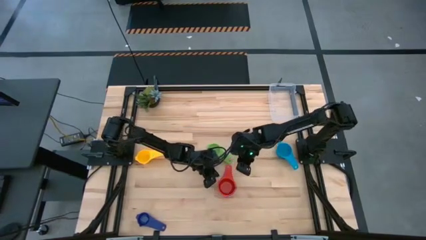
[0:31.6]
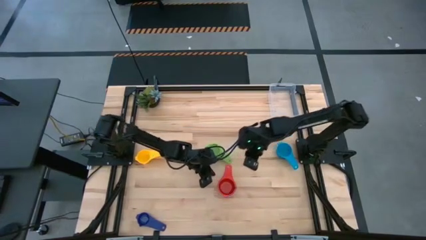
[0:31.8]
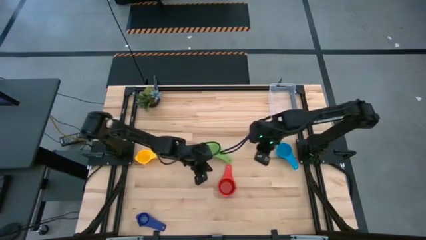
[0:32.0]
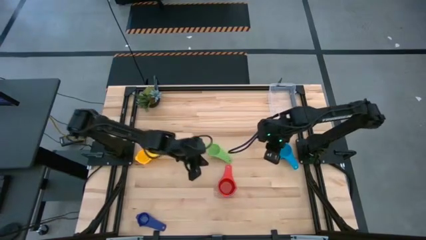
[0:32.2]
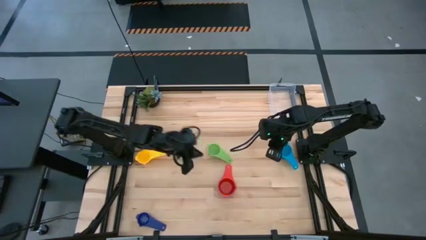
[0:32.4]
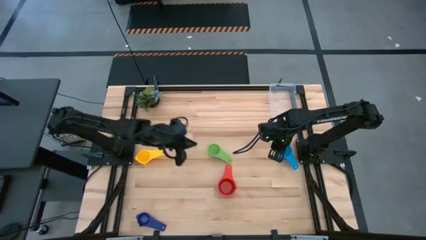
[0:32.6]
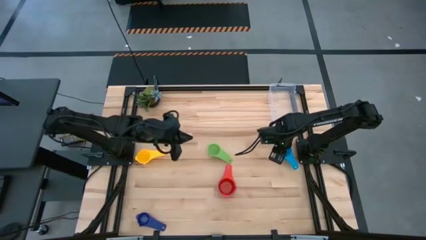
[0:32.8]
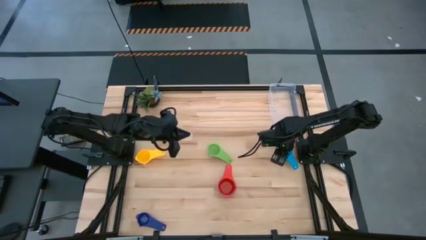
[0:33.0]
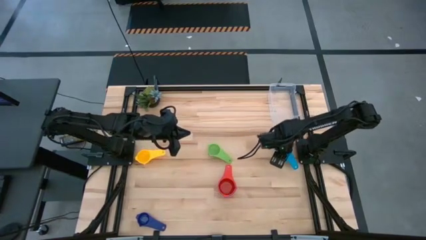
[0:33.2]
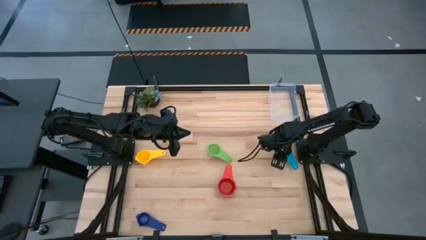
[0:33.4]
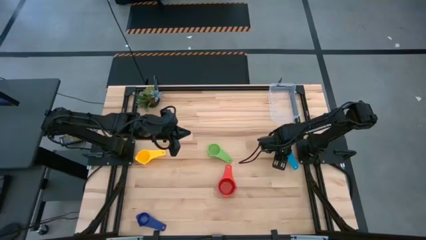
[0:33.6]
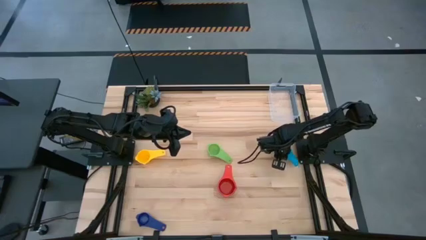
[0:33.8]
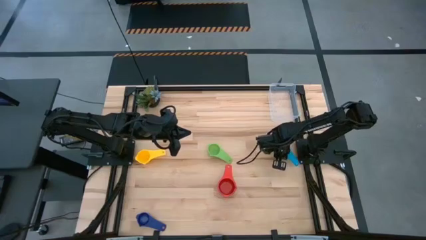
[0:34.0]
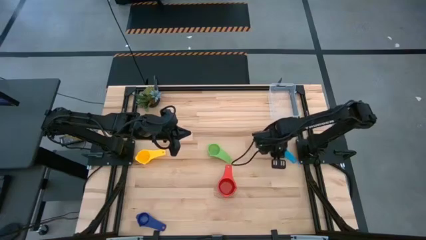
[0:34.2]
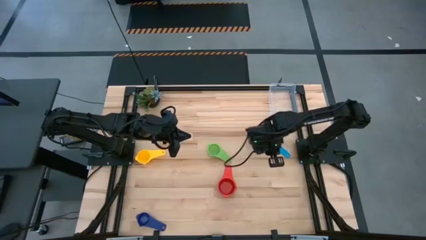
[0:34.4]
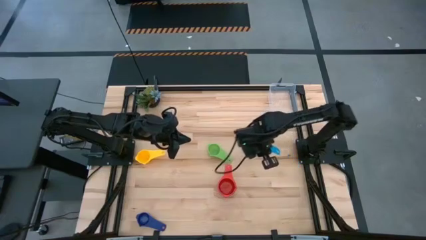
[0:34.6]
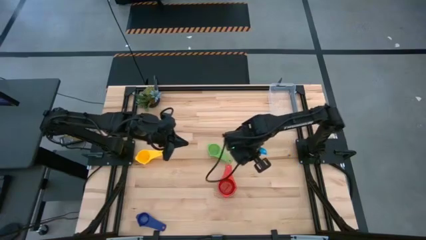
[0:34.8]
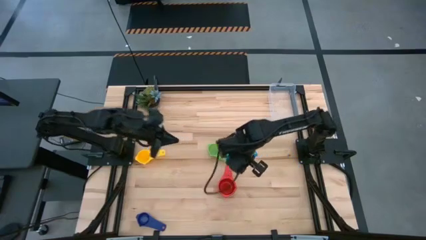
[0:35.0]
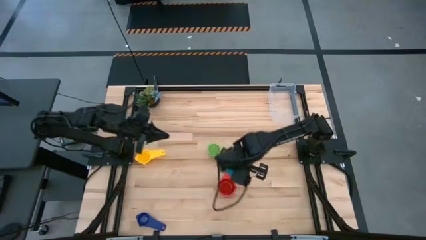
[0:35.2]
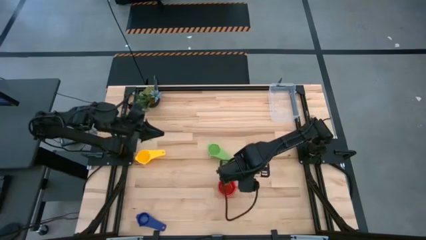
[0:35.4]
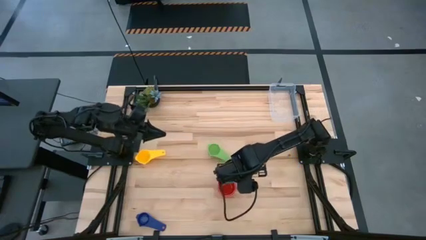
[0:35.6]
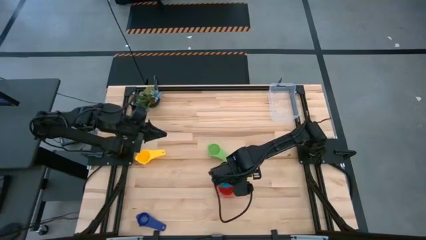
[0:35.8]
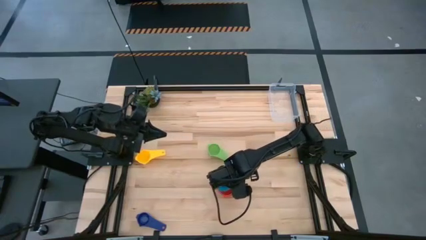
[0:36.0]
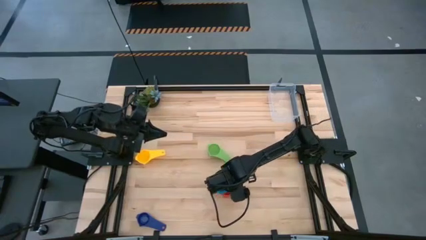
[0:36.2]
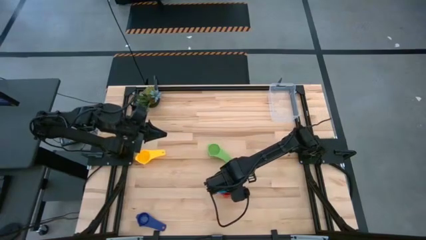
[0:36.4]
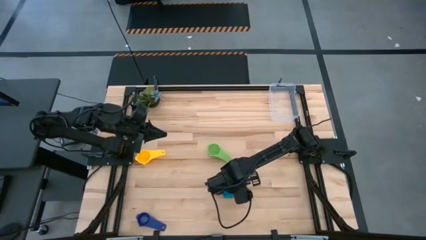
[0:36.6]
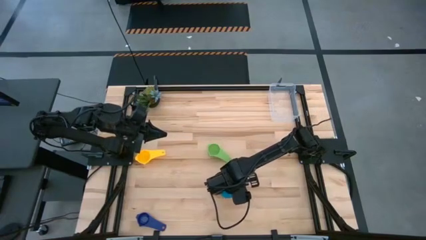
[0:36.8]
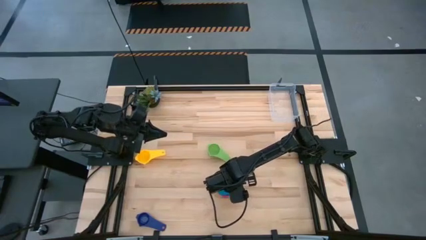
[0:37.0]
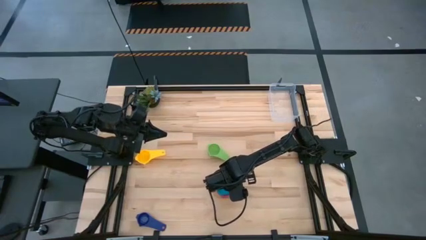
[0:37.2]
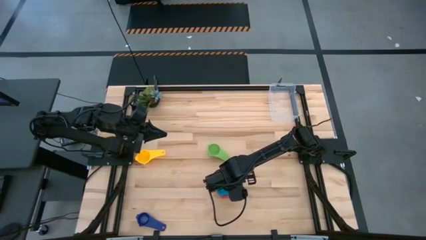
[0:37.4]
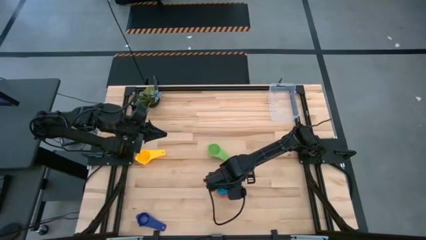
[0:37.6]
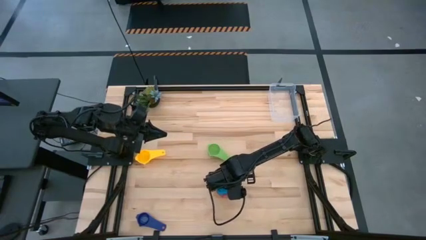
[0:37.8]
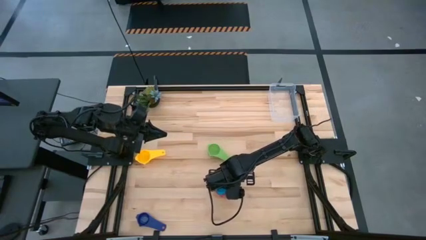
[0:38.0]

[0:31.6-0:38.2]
Task: Nest measuring cups in basket
Stack the light blue measuring cup on top of the red measuring cup

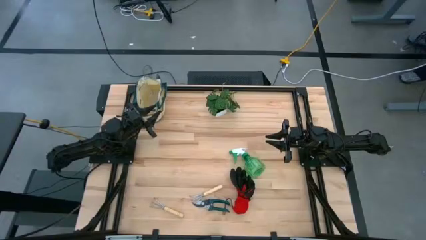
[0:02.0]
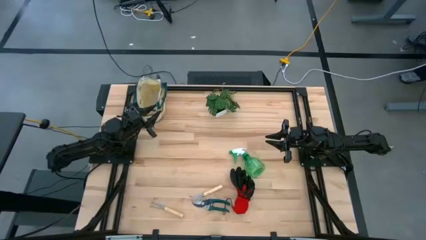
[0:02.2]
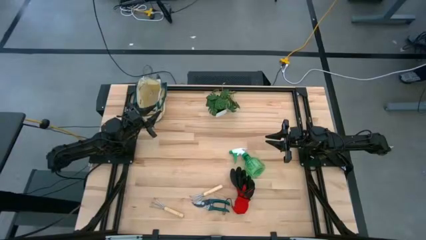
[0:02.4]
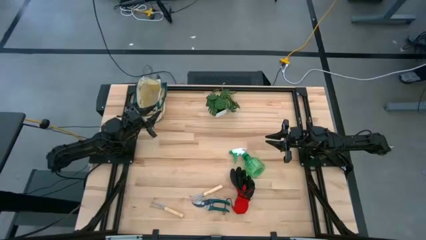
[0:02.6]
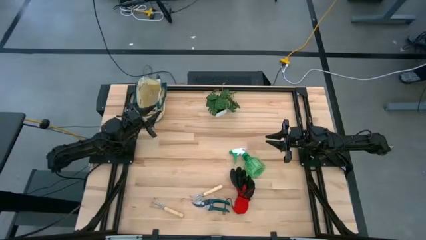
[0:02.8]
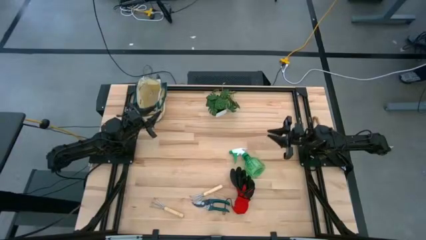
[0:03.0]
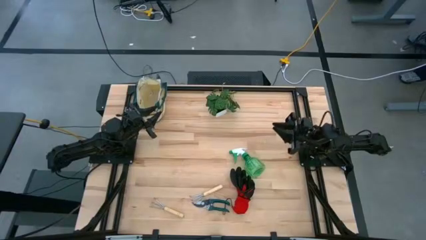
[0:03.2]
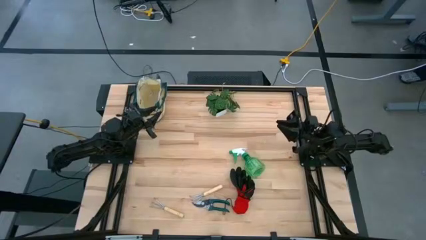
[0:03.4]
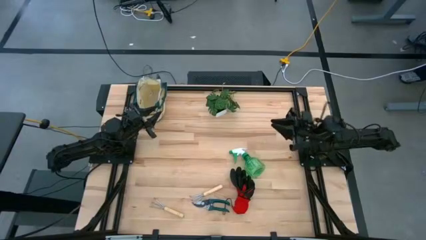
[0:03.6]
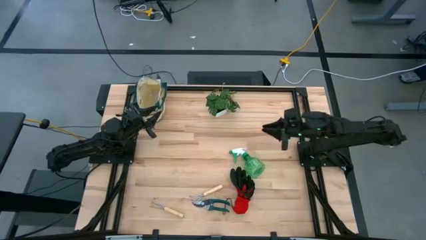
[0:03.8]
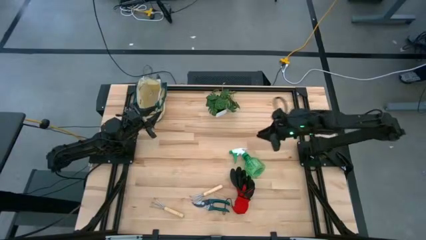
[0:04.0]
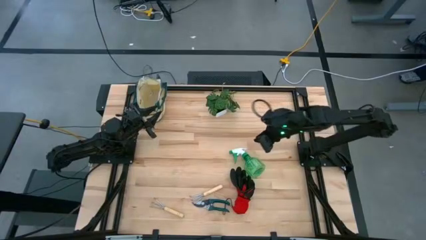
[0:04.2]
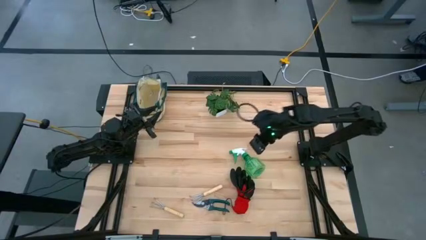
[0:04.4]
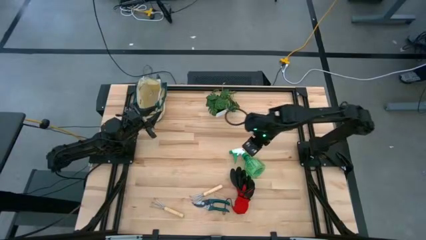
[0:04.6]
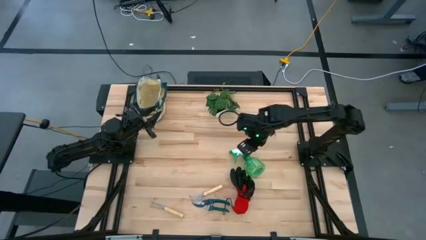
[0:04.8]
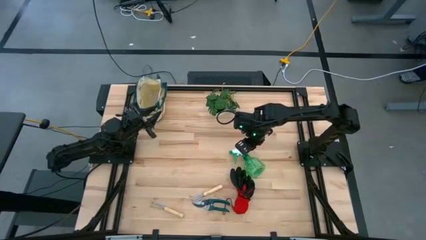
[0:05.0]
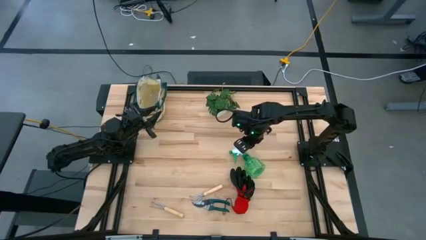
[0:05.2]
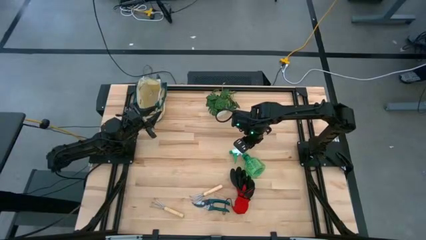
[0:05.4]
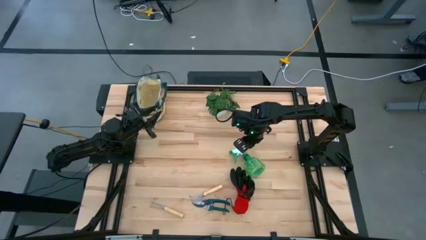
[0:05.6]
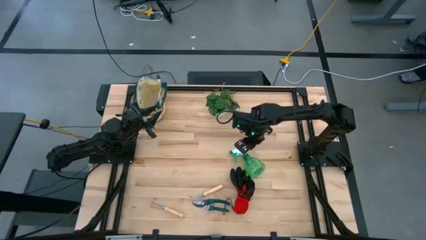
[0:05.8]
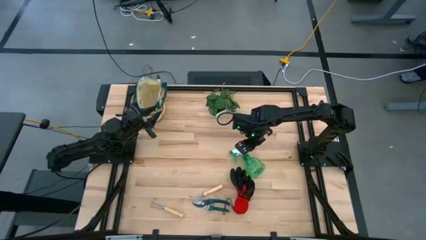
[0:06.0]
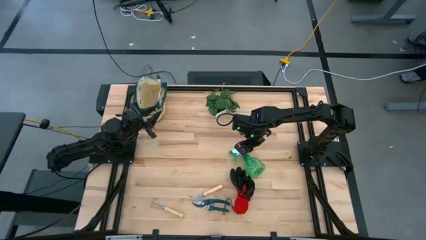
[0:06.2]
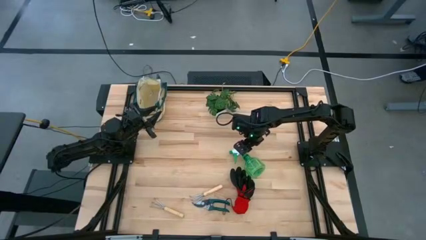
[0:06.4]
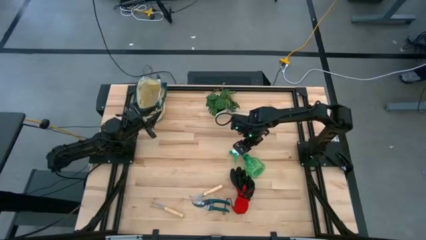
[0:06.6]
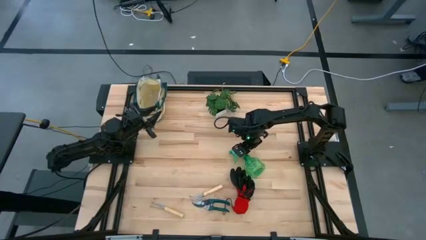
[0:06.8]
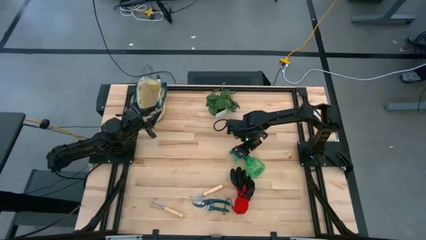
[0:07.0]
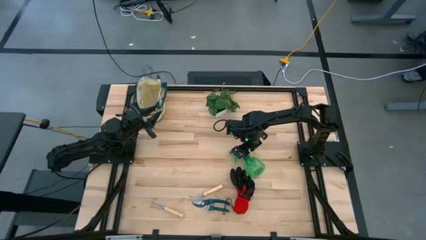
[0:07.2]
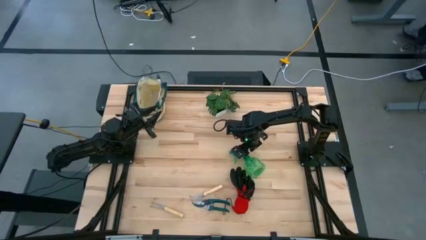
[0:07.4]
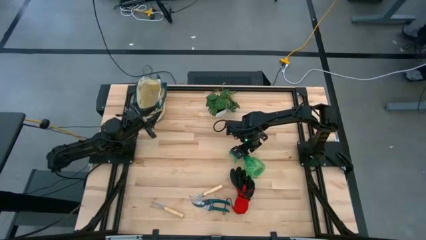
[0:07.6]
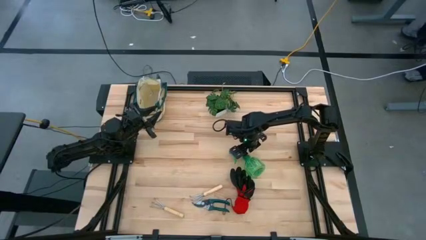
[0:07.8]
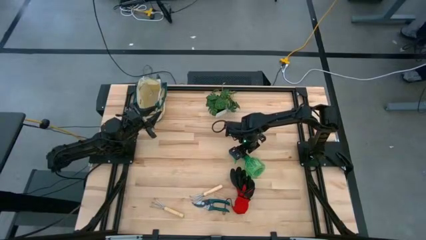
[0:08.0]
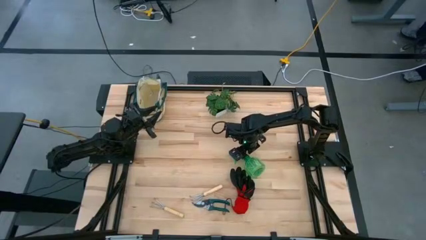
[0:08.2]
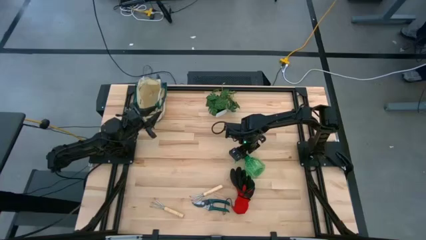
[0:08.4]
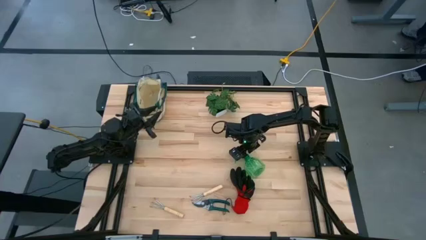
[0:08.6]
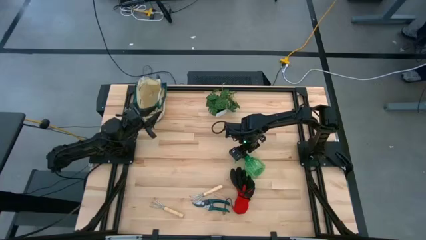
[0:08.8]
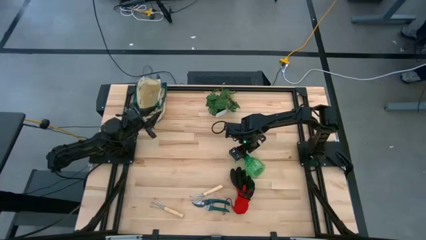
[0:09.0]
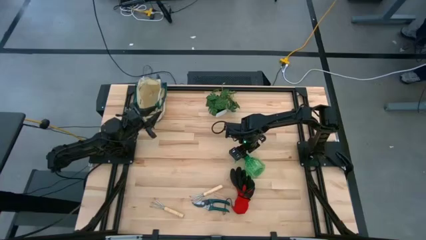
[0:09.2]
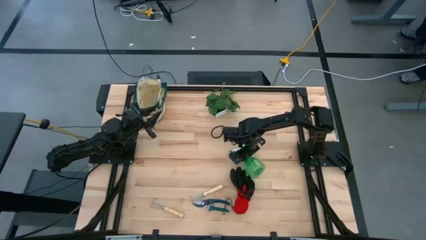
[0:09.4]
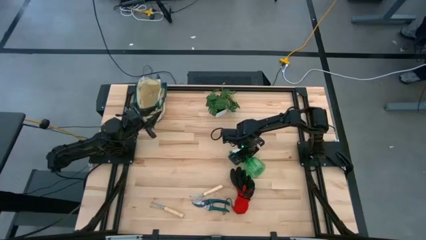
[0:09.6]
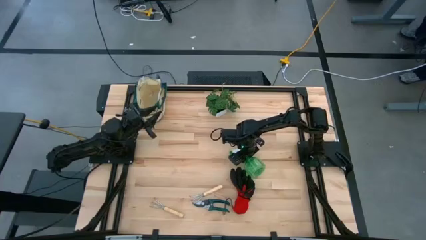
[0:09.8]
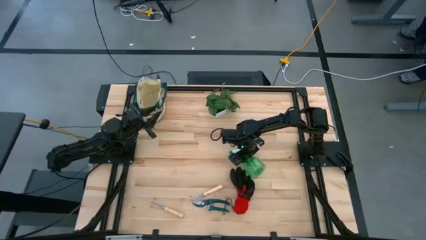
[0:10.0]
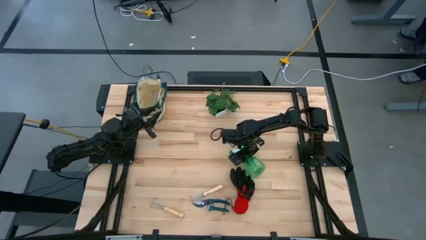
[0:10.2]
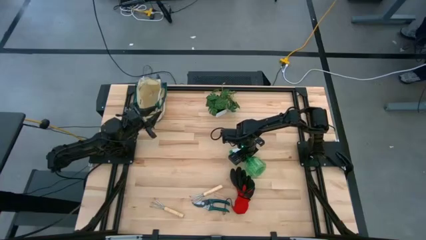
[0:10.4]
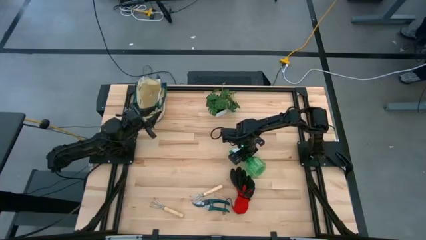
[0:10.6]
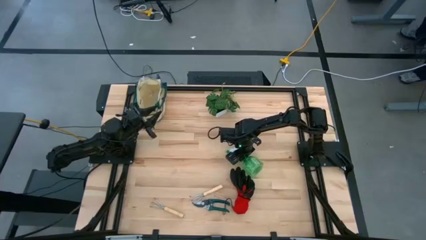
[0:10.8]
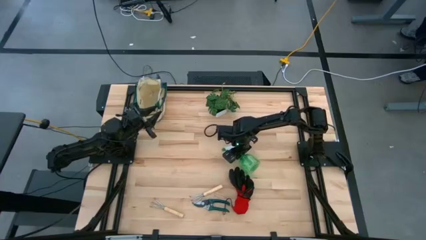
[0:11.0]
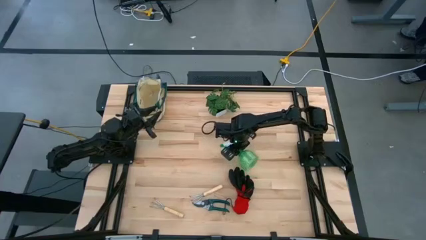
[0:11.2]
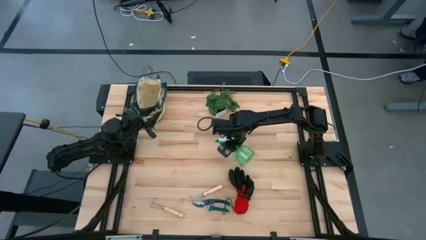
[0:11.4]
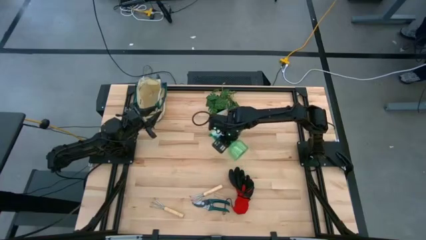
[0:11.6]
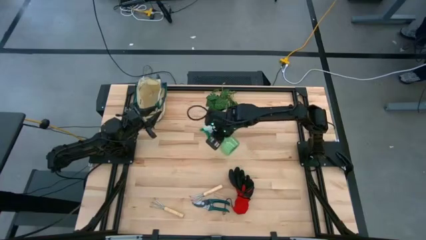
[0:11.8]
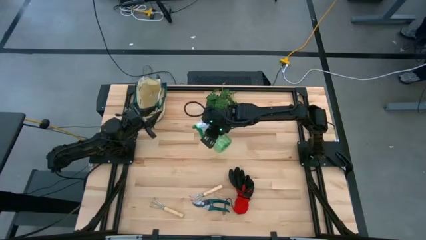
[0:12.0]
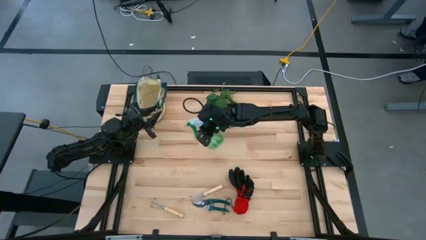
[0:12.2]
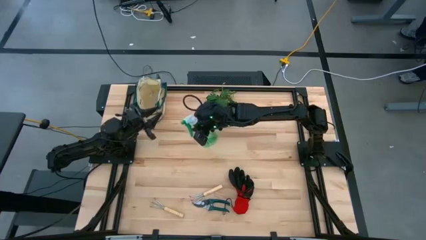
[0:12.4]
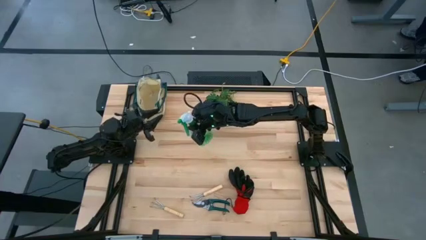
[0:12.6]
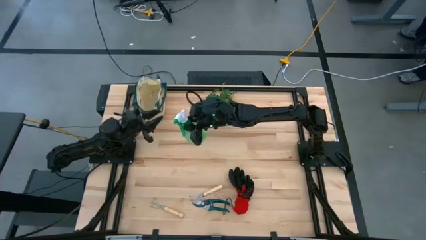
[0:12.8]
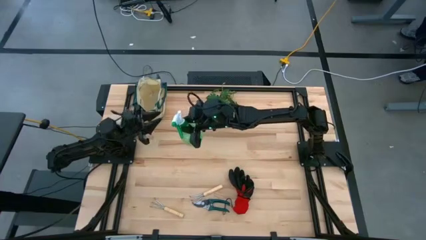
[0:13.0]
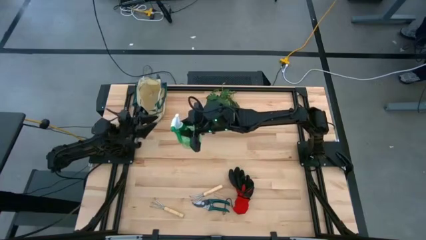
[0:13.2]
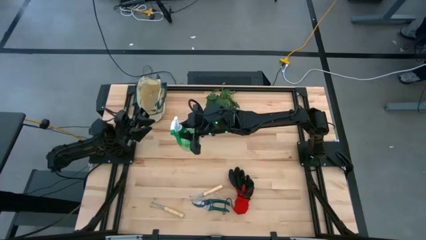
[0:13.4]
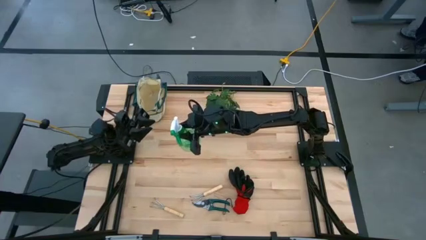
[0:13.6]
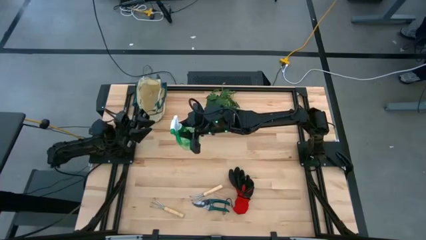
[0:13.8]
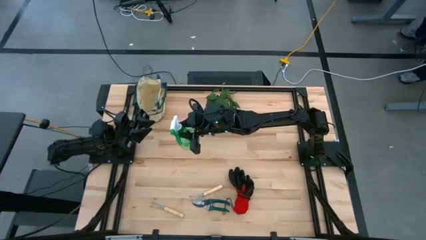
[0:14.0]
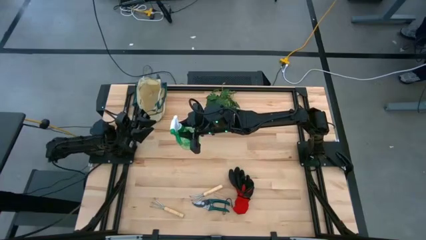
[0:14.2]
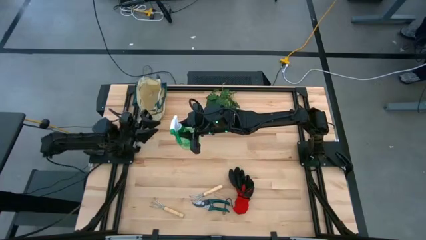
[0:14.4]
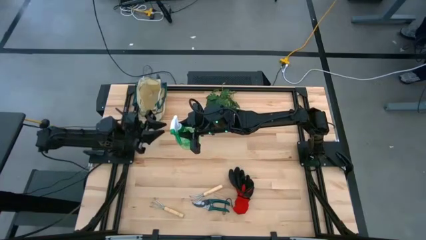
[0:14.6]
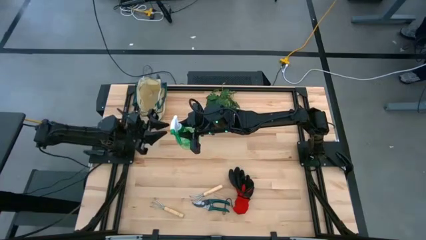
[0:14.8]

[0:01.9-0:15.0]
Task: Pick & Place Garden tools in Gardening bag
Put the green spray bottle into the green gardening bag
